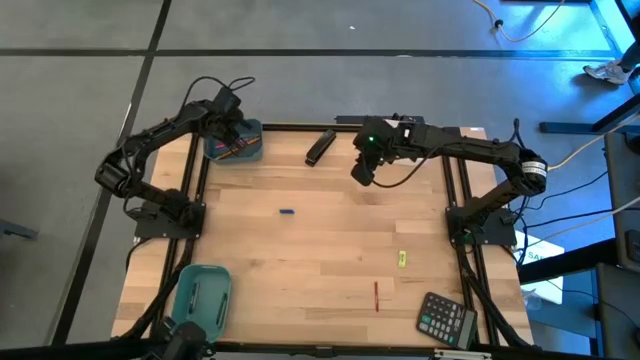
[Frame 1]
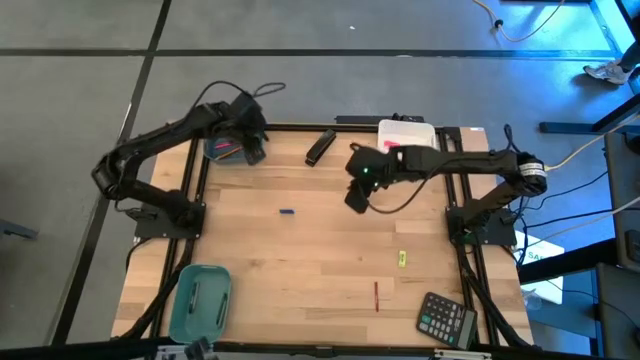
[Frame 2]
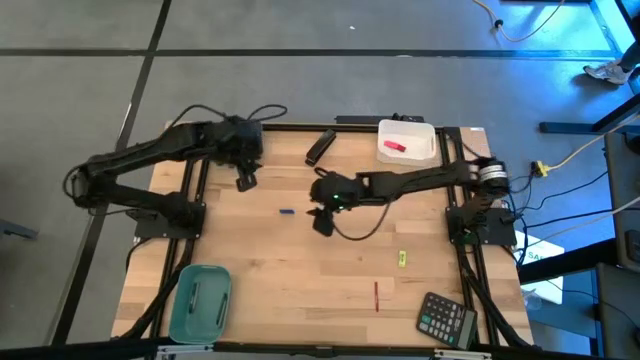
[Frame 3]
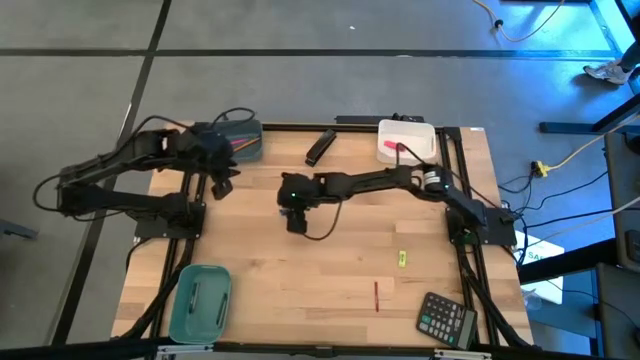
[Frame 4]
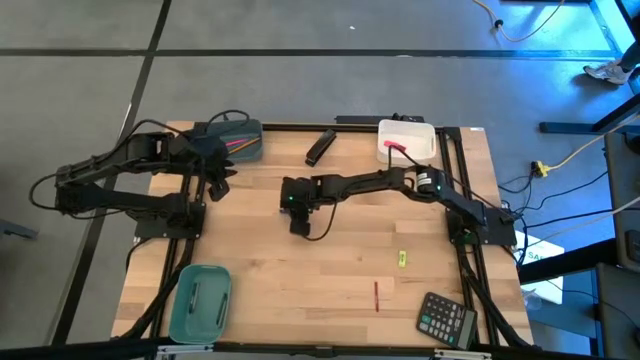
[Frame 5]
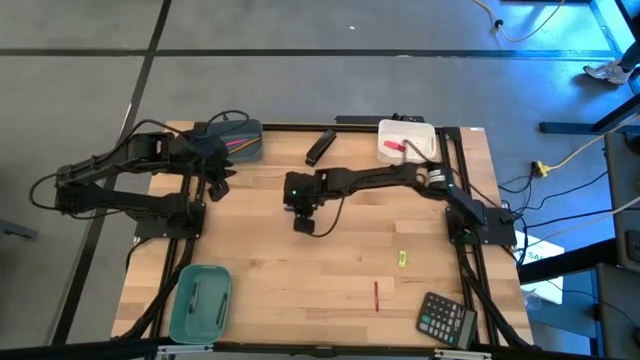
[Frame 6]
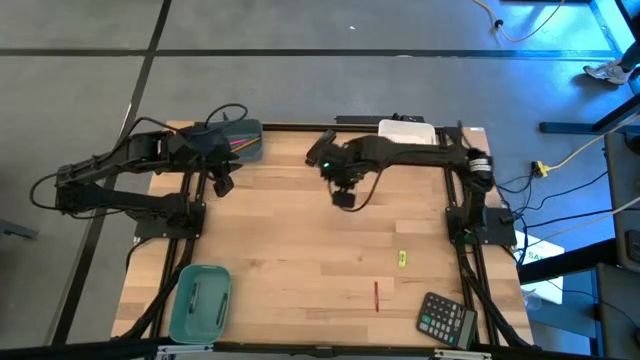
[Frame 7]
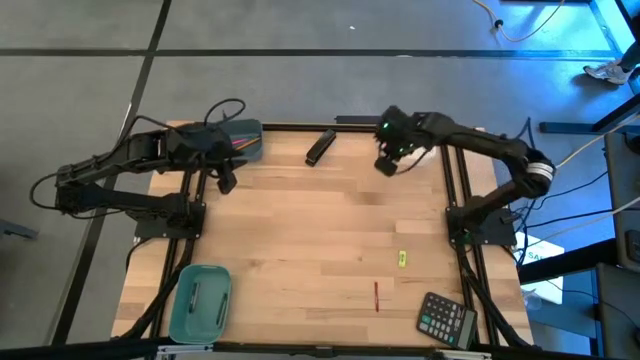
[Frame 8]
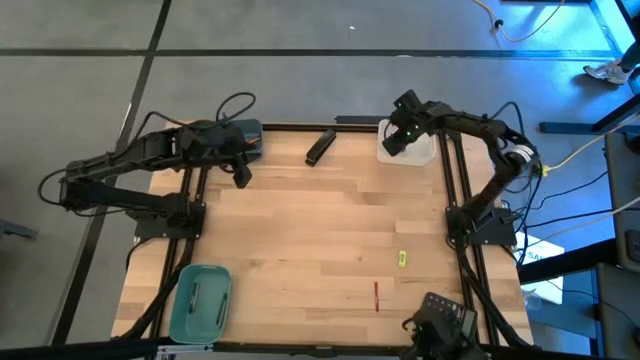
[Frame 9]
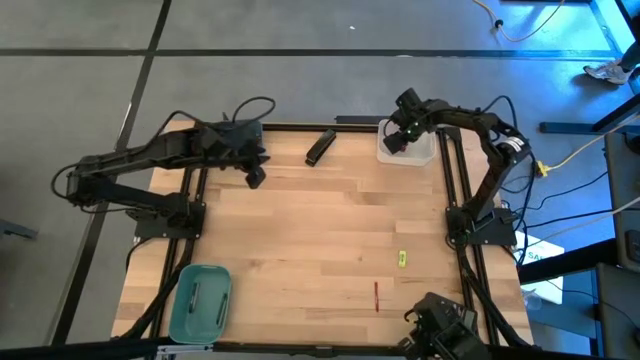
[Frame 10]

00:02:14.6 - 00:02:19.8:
Task: Sort crayons/erasers/pens/pencils in bins
Put the blue eraser into the white bin

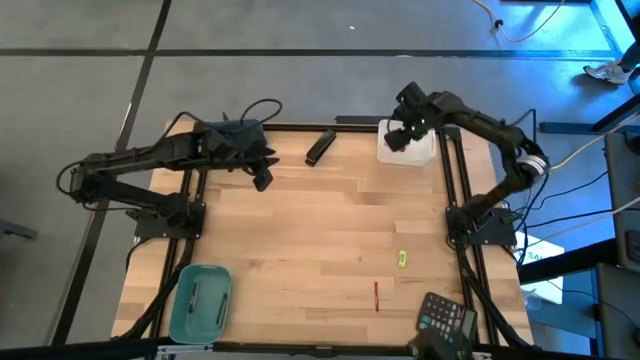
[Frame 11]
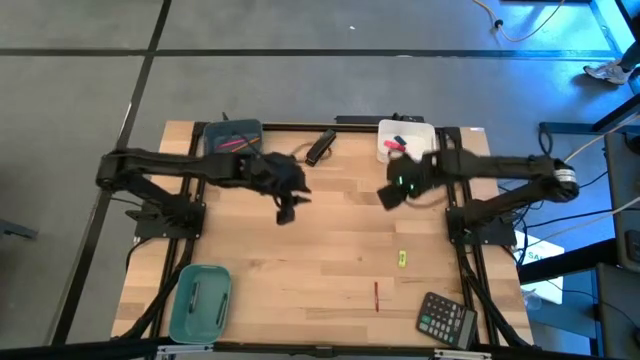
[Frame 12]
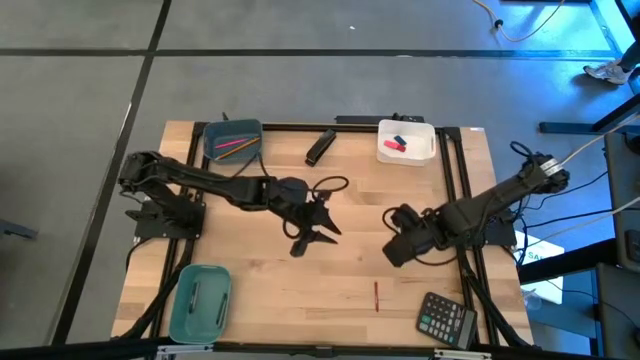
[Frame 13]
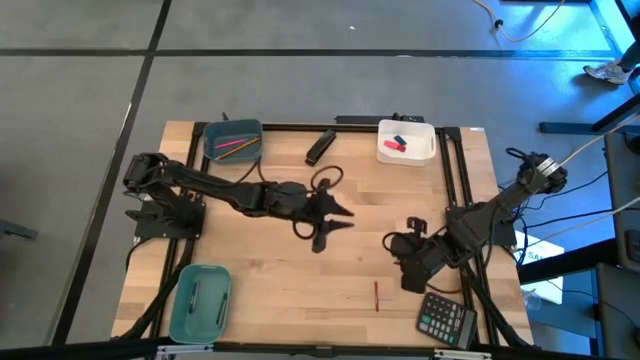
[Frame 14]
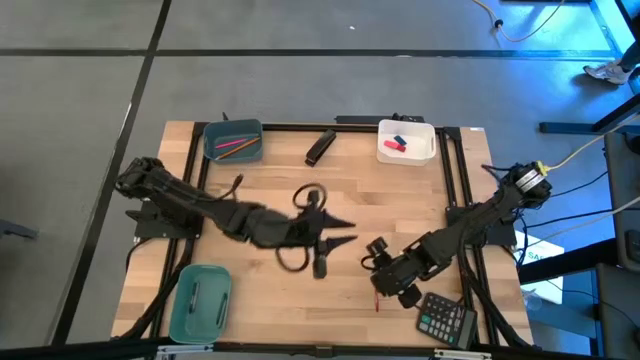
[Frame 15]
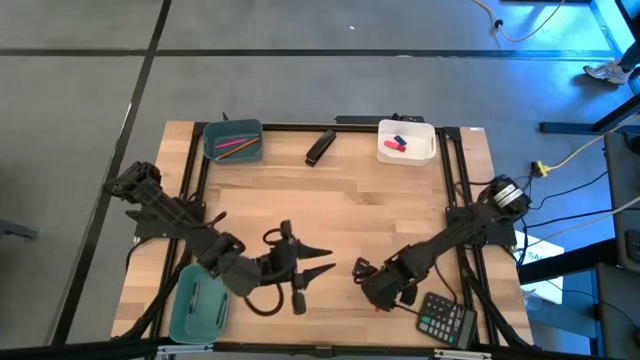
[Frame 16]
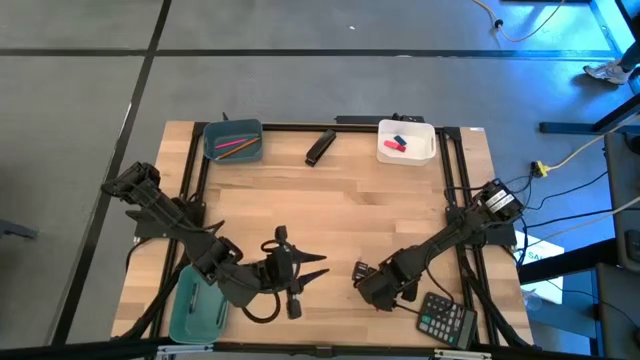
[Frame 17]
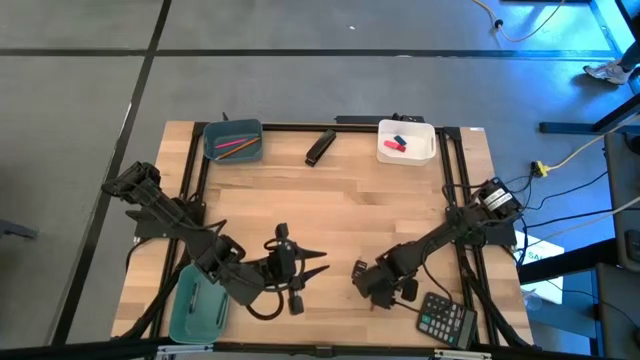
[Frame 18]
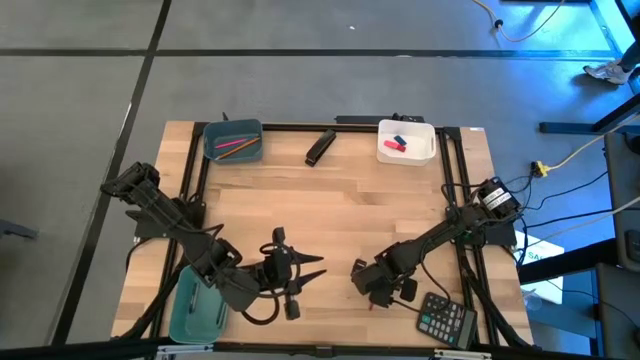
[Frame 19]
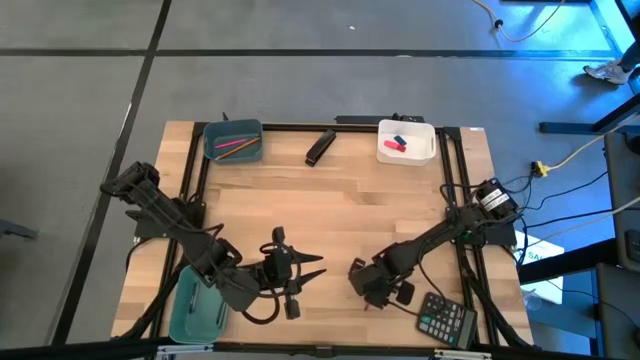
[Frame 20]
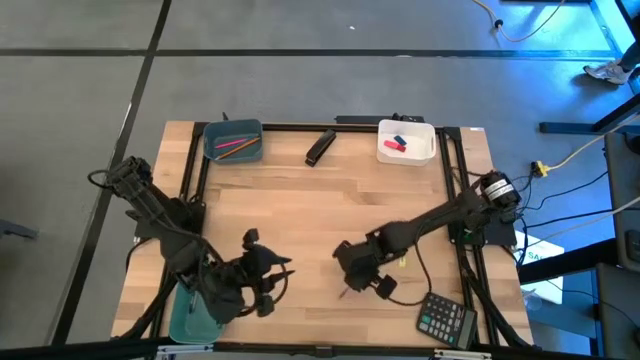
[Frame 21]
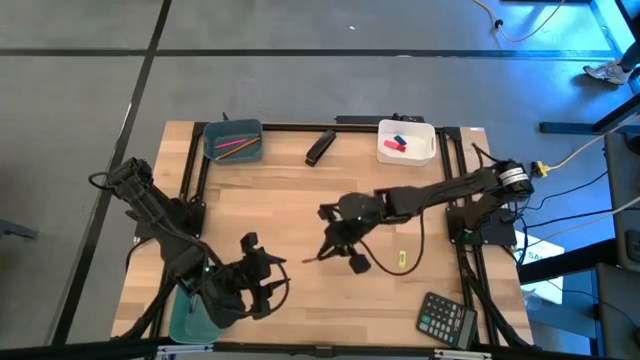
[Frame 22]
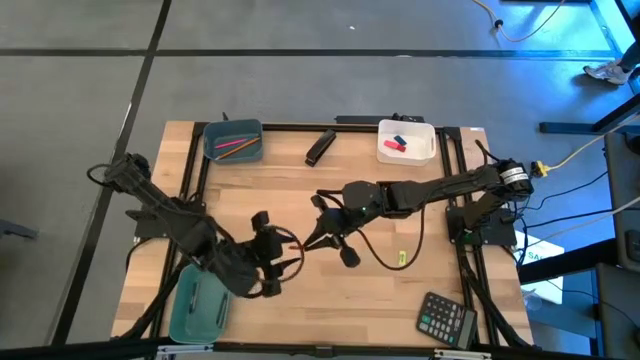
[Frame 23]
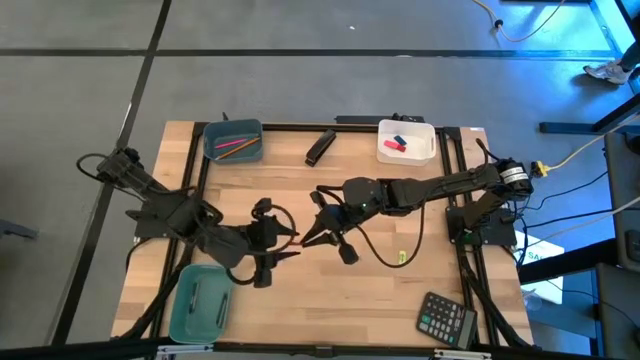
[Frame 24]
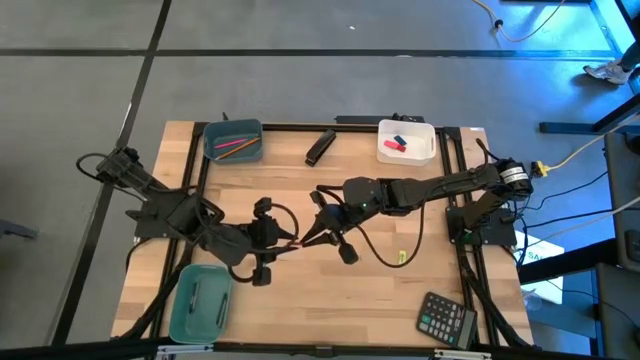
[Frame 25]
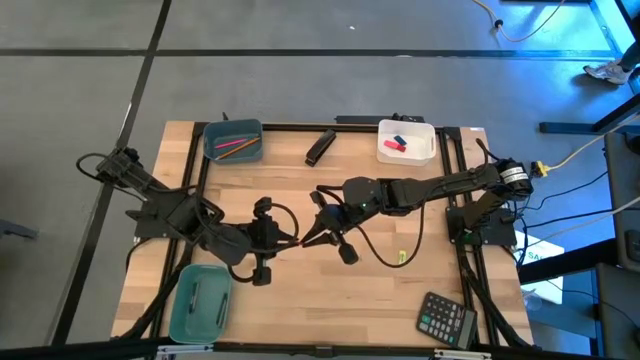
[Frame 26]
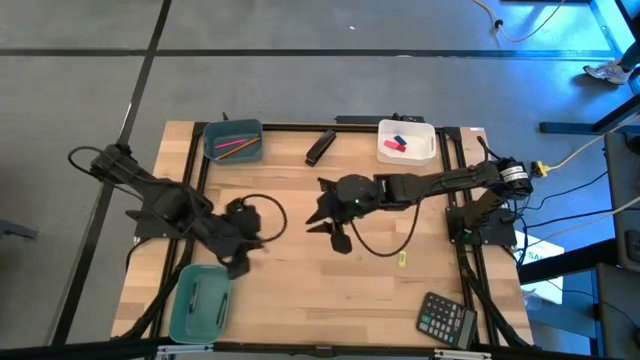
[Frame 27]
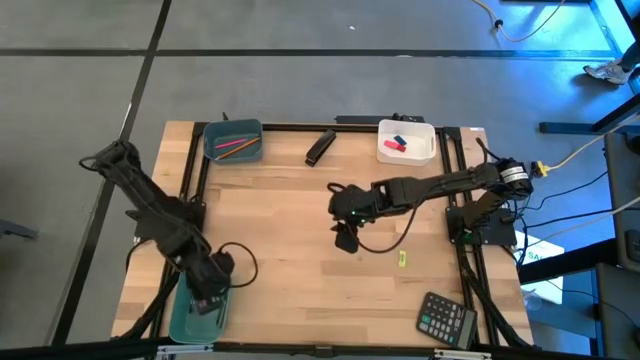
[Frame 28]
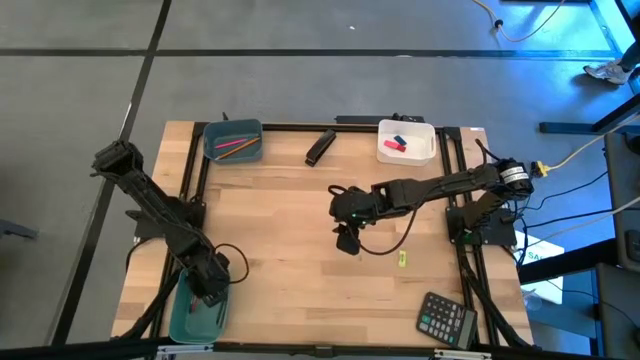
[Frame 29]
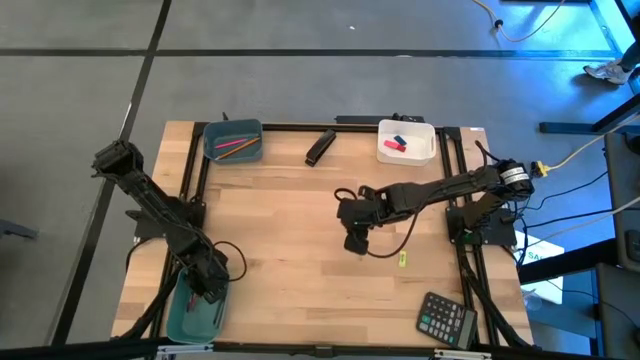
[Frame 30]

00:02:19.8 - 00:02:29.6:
Put the red crayon into the green bin

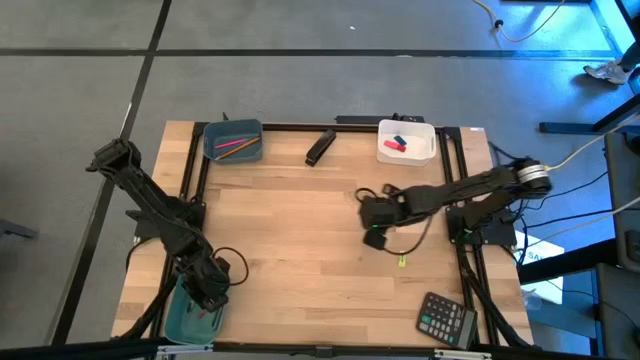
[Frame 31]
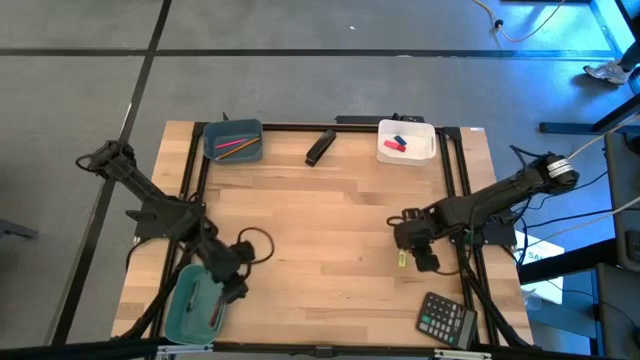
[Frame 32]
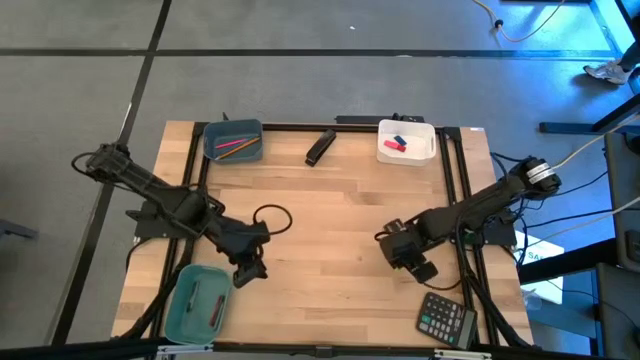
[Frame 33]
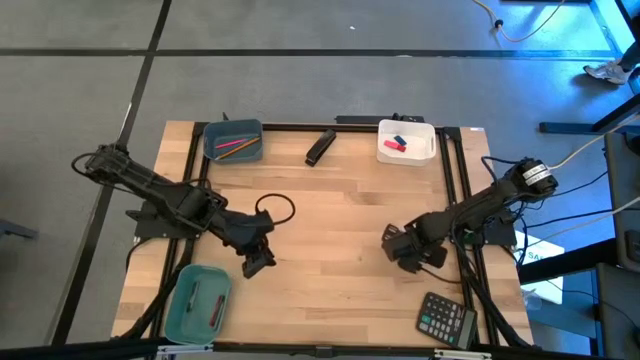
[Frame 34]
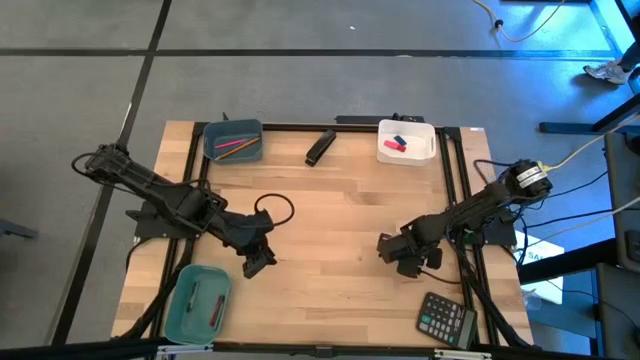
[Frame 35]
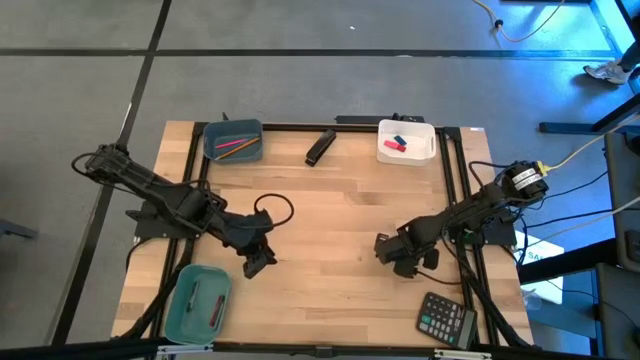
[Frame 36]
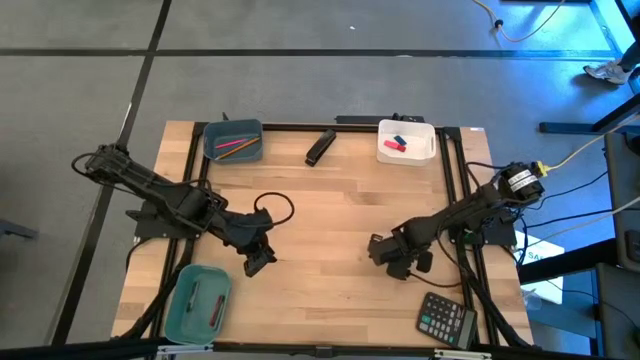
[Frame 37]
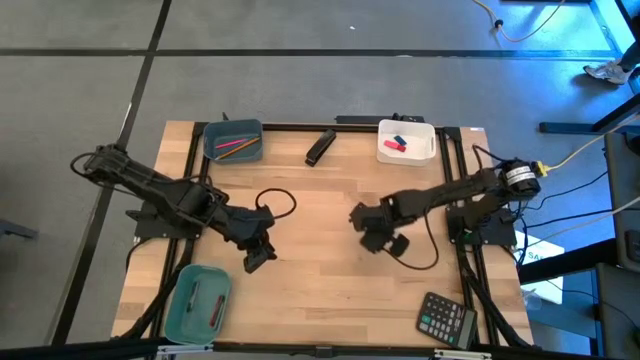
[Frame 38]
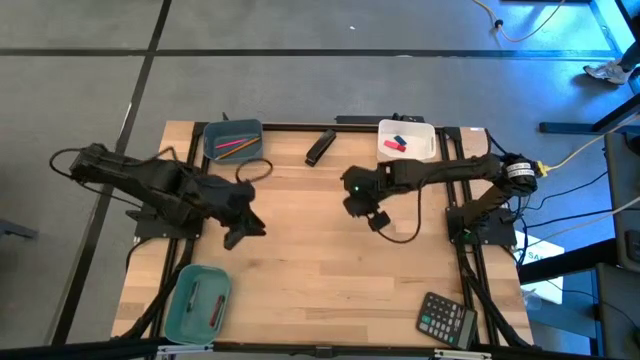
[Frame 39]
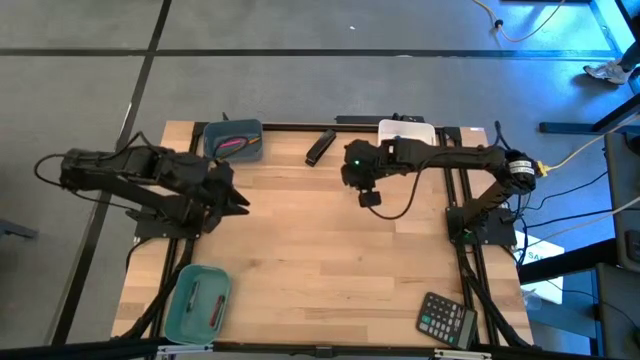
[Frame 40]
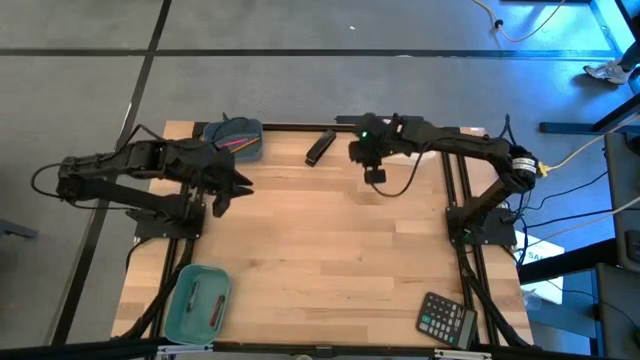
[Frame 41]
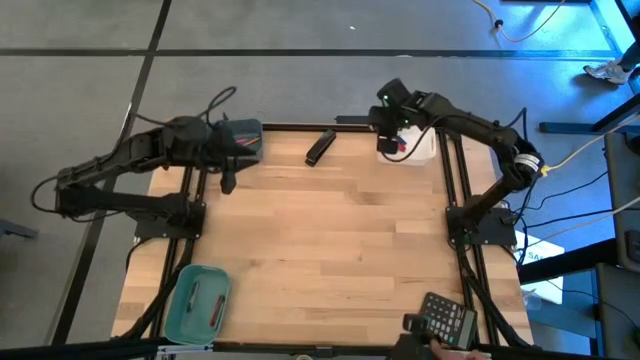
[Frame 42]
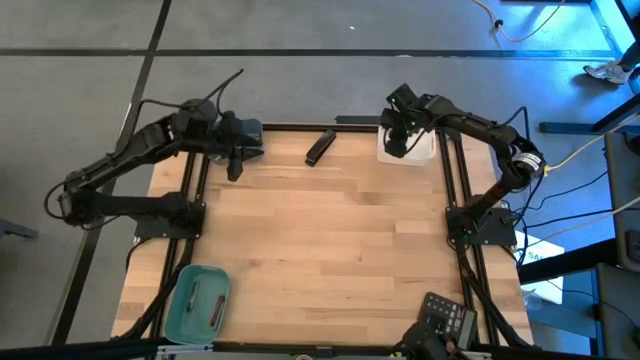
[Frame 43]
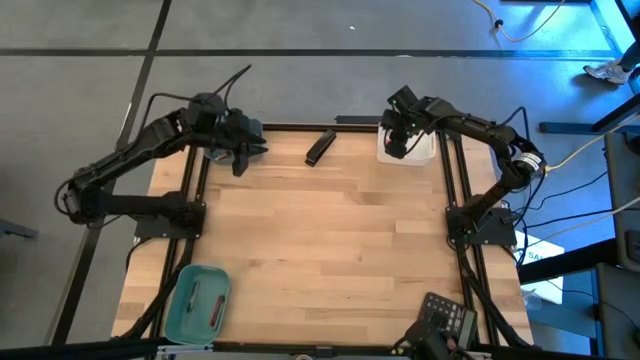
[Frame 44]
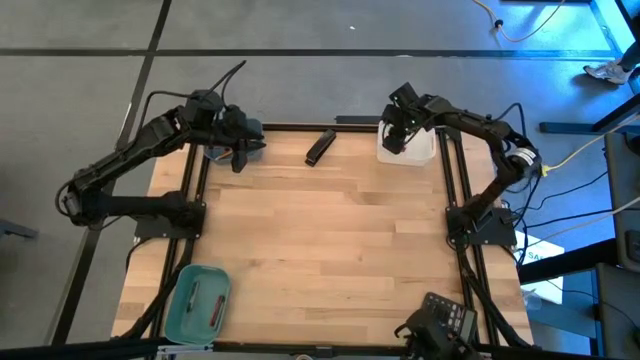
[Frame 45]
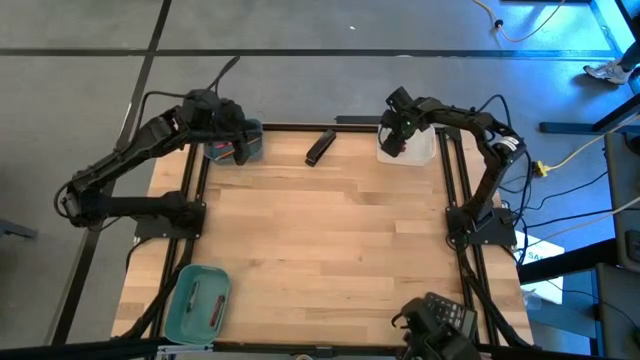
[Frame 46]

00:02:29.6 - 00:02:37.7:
Put the yellow eraser into the white bin
